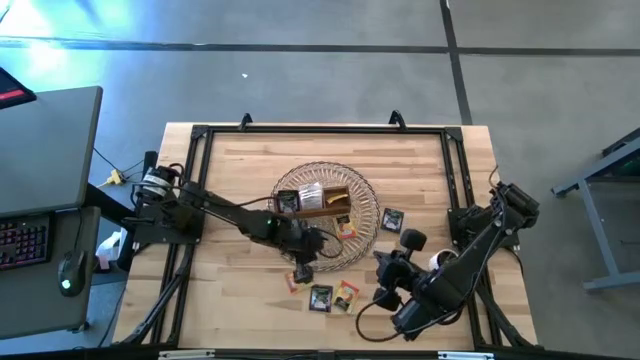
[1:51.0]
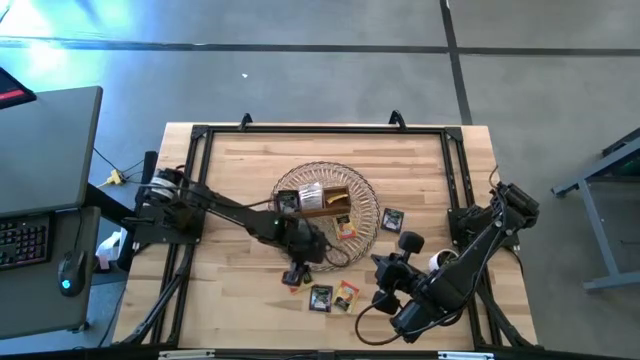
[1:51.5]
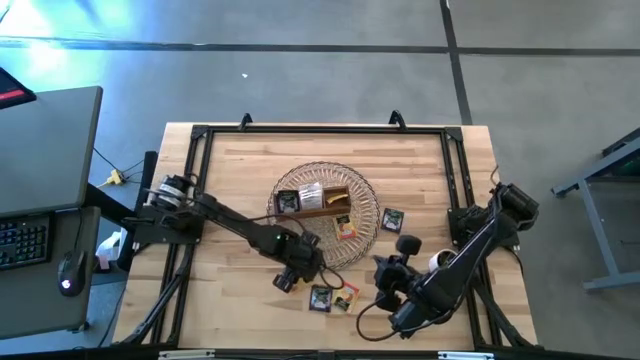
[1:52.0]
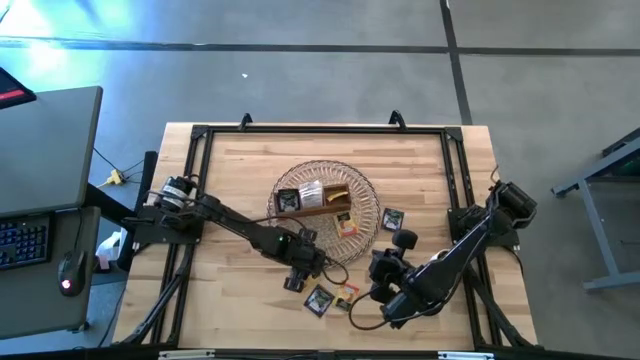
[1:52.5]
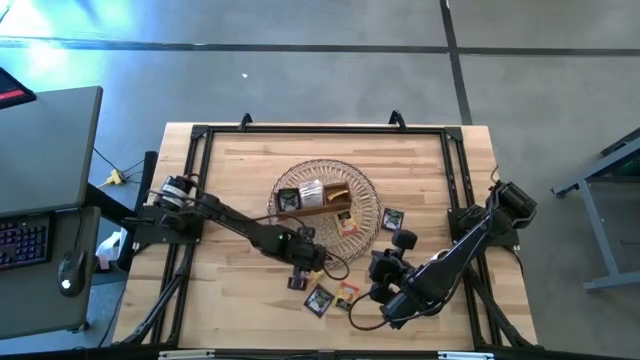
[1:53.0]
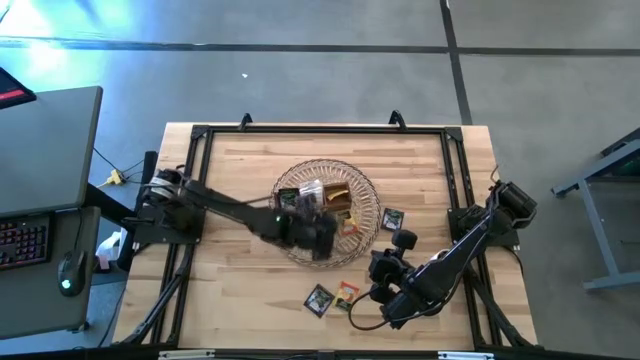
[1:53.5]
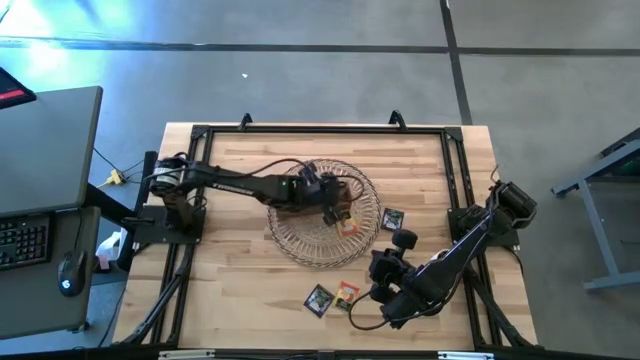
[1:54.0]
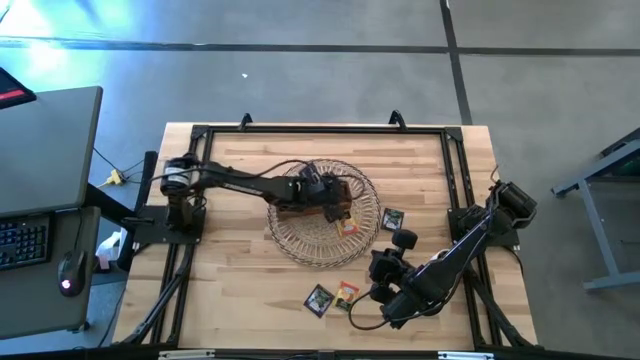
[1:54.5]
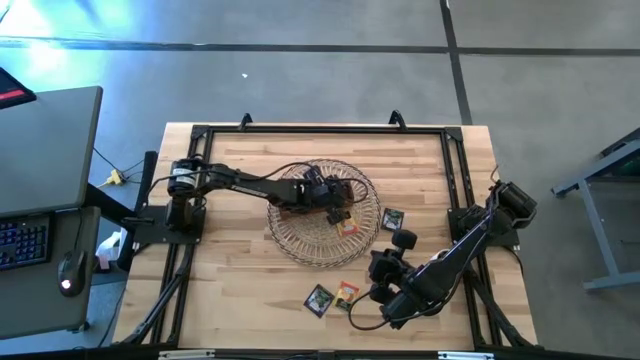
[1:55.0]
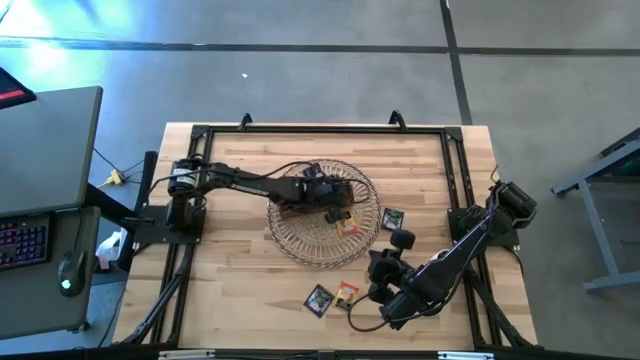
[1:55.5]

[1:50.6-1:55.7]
Task: Pick & Place Tea
Put the yellow tea bag into the right section of the brown wooden organizer

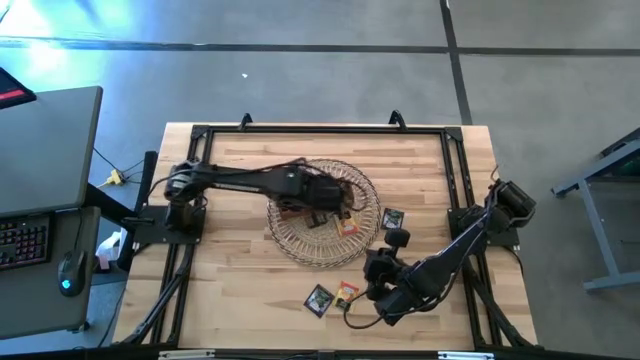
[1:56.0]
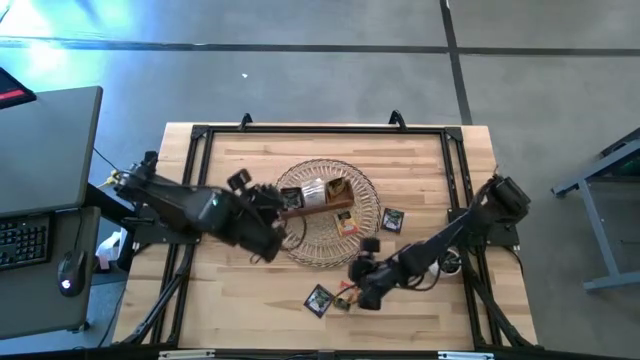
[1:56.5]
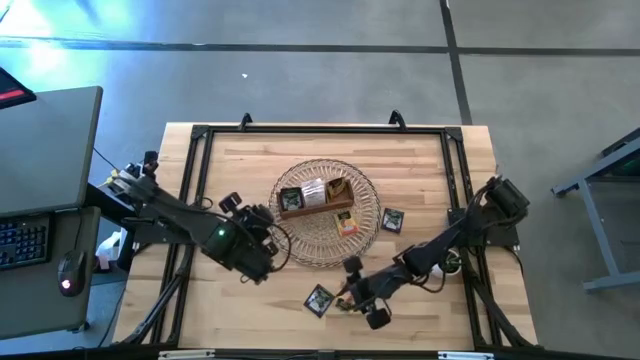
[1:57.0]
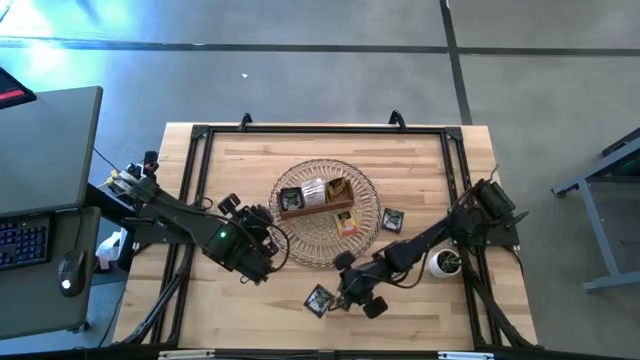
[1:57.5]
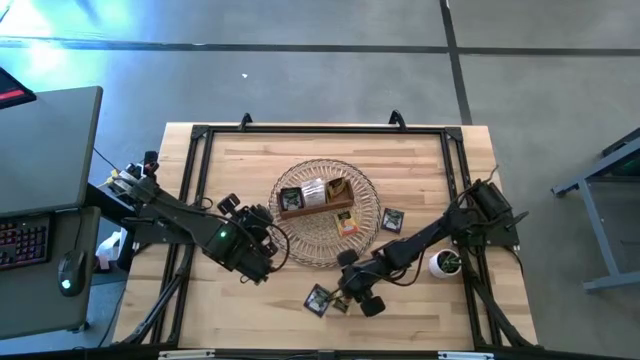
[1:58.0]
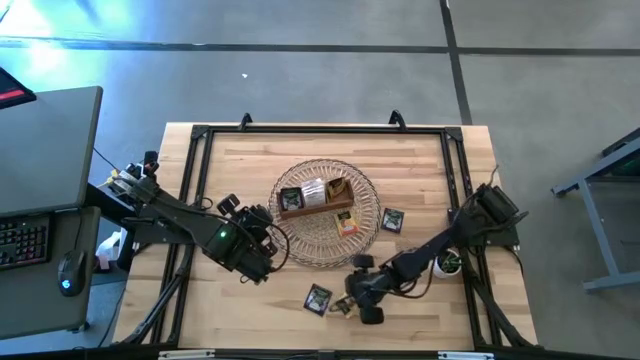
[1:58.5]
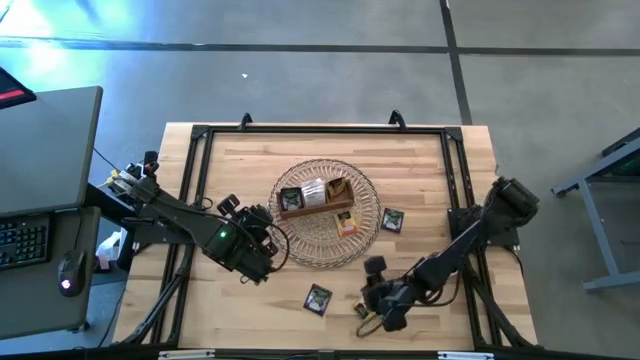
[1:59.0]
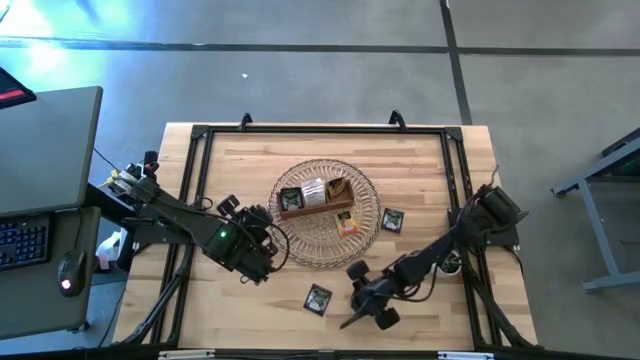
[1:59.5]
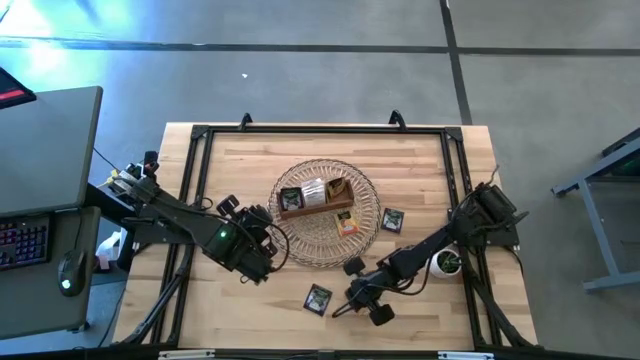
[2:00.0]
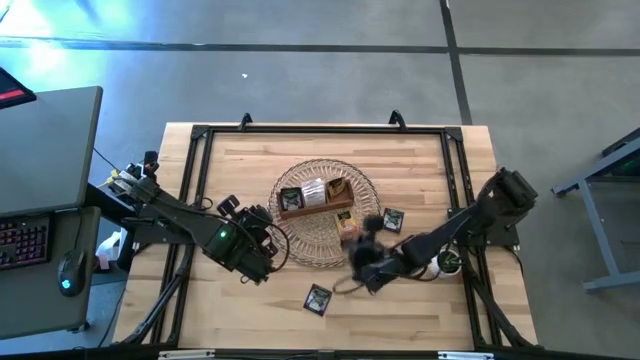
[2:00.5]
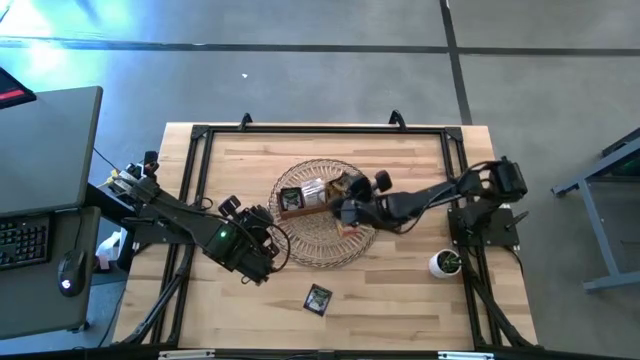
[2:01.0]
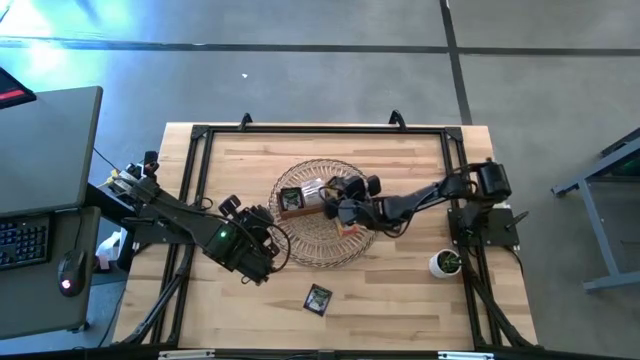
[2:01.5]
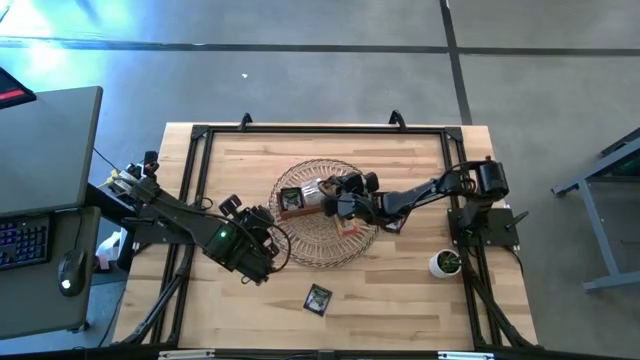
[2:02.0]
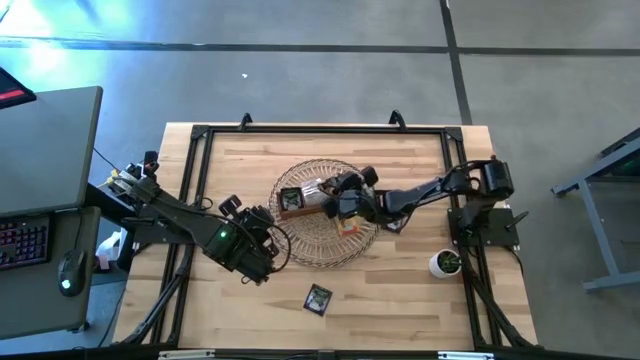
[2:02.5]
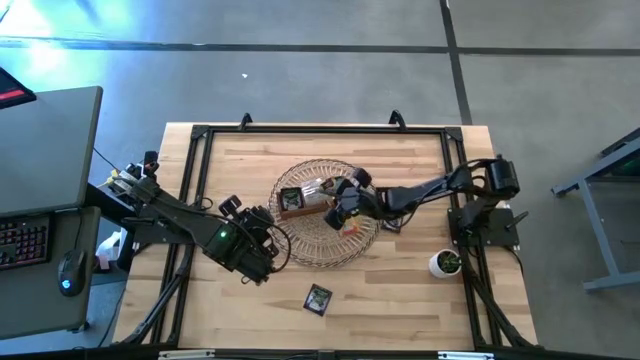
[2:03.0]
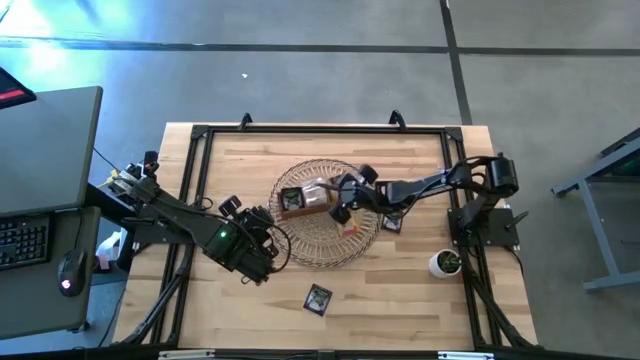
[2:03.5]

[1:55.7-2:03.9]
Put the yellow tea bag into the right section of the brown wooden organizer

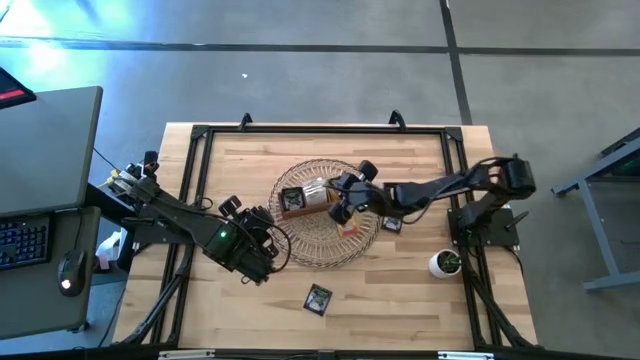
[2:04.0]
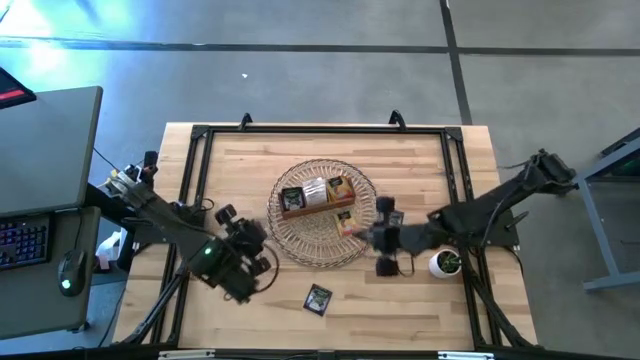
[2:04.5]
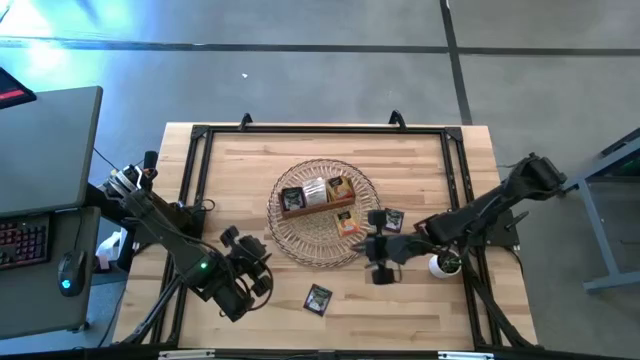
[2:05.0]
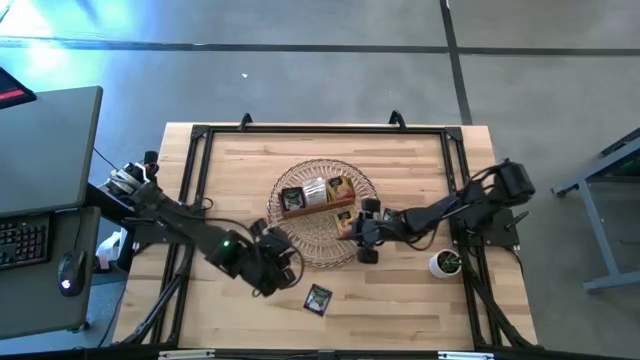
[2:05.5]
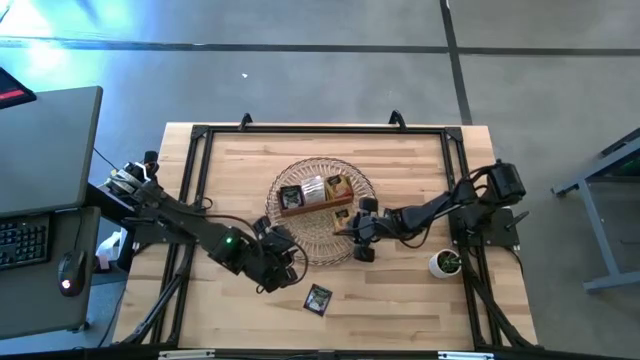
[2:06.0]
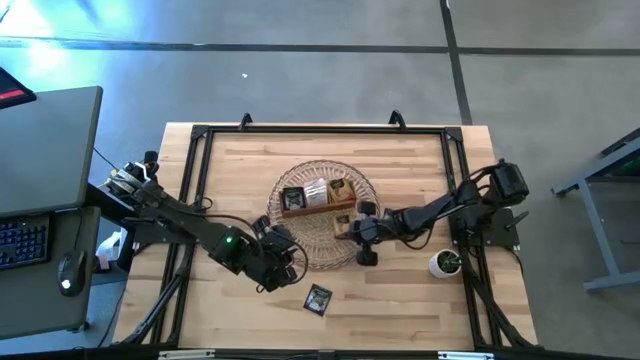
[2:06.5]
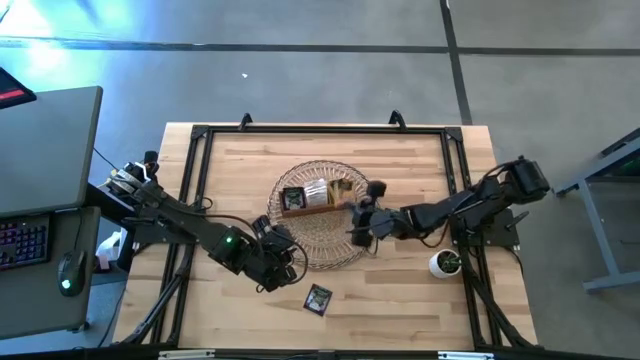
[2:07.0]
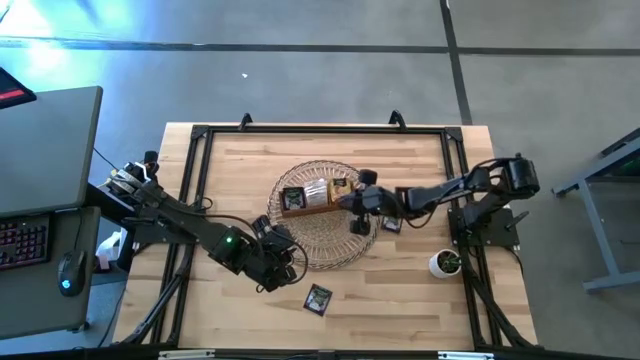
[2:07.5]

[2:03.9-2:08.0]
Put the yellow tea bag into the right section of the brown wooden organizer

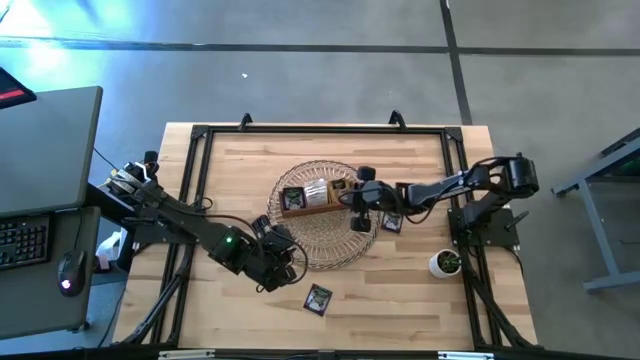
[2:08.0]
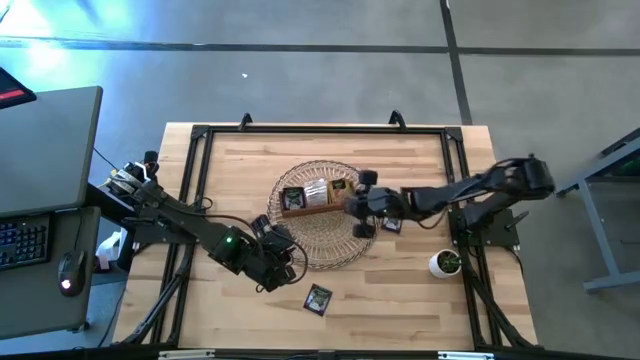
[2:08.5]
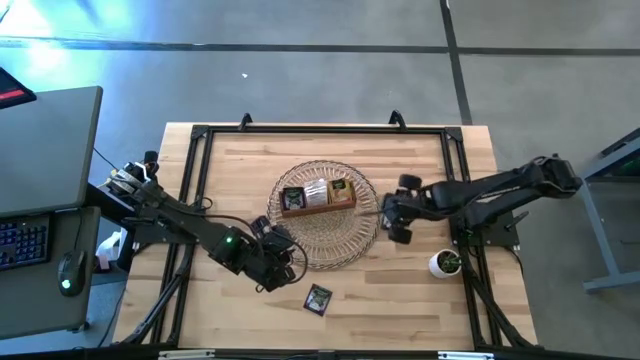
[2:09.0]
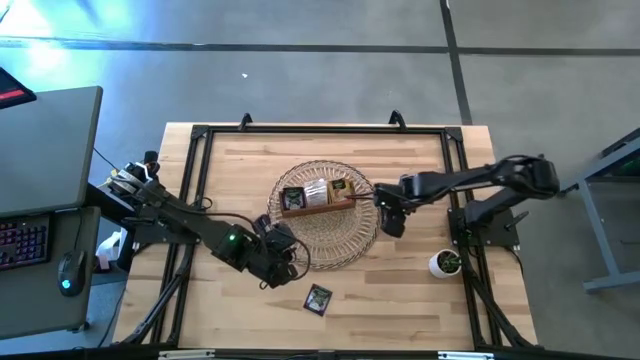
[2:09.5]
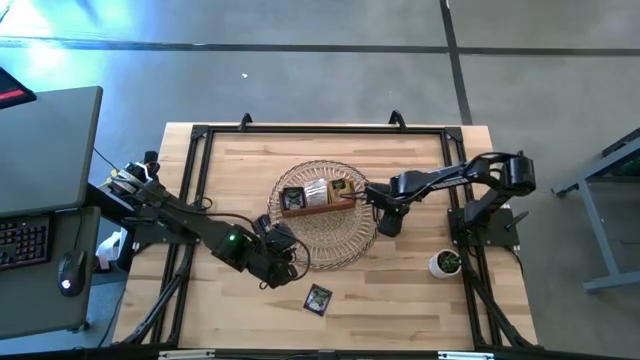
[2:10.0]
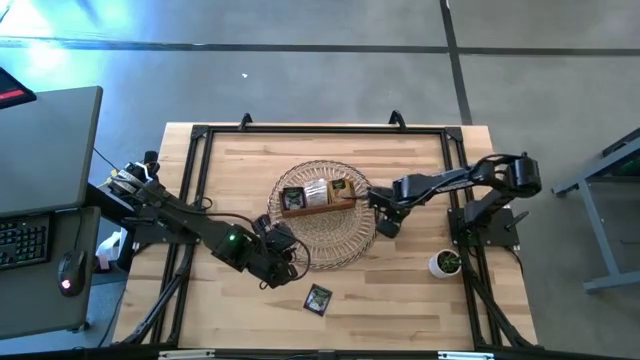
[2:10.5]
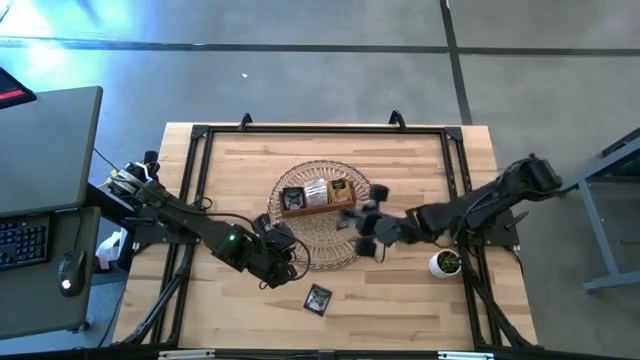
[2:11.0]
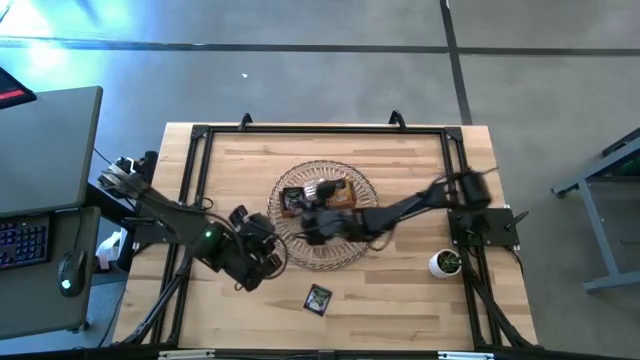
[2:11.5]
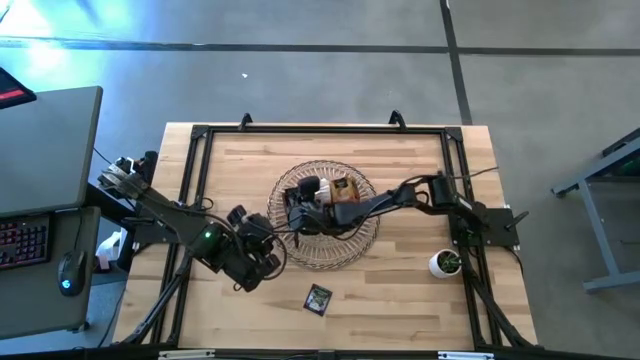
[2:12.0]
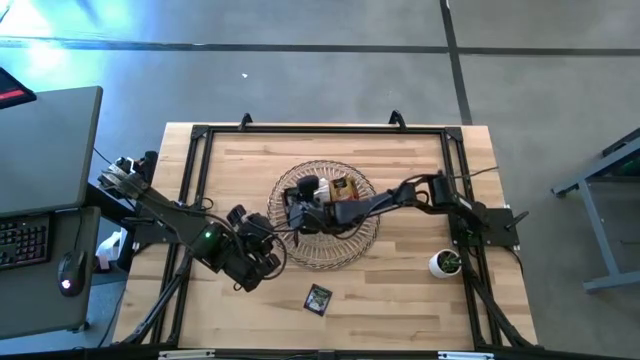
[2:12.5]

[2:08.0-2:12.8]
Put the violet tea bag into the left section of the brown wooden organizer
